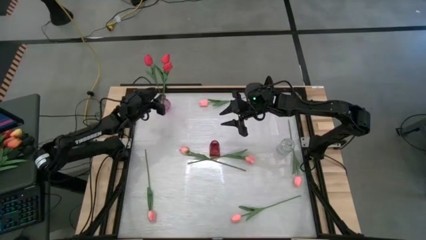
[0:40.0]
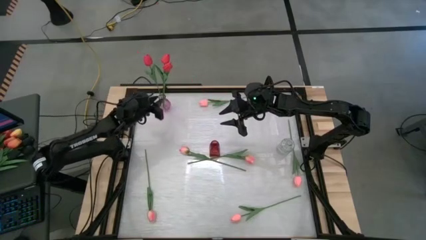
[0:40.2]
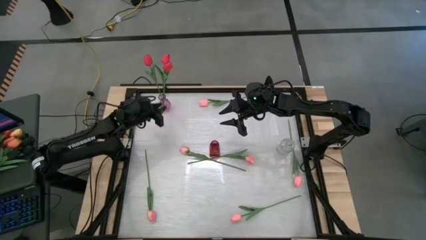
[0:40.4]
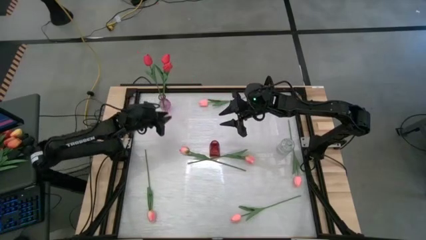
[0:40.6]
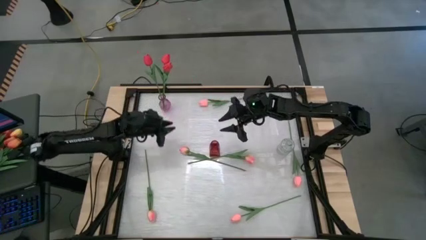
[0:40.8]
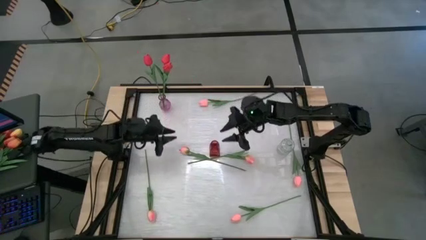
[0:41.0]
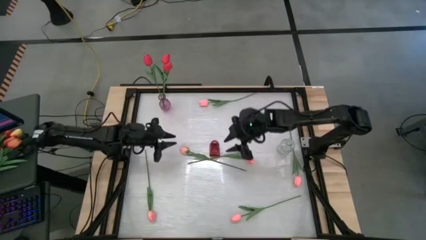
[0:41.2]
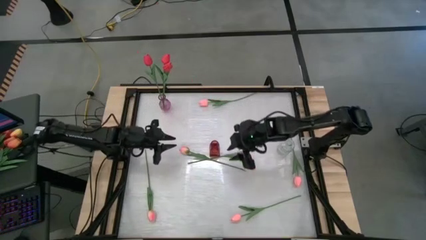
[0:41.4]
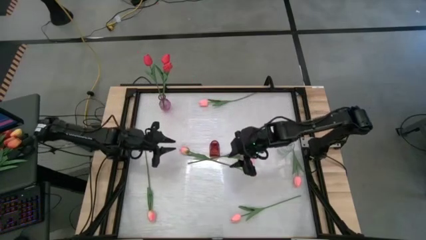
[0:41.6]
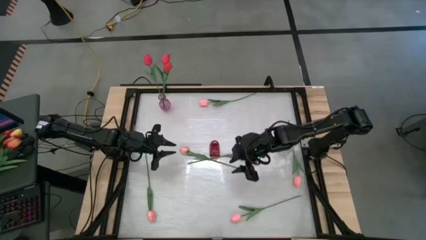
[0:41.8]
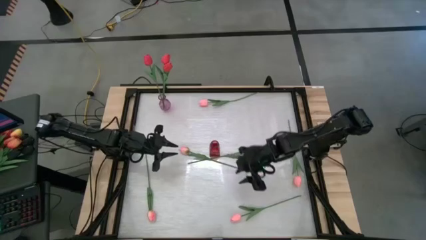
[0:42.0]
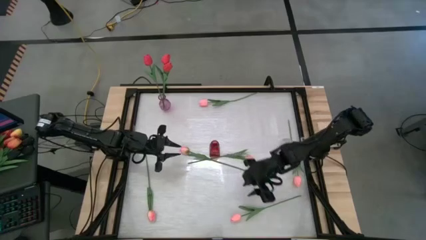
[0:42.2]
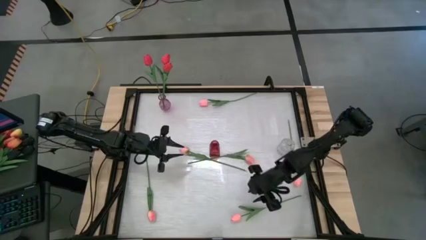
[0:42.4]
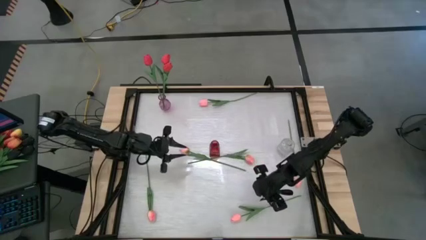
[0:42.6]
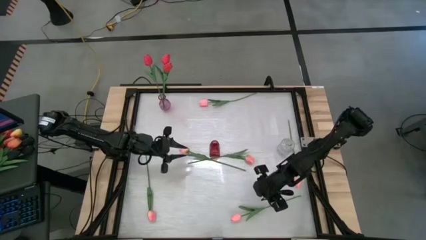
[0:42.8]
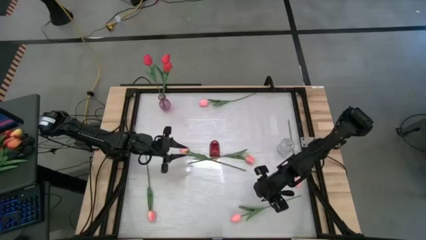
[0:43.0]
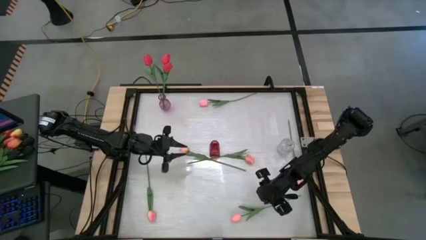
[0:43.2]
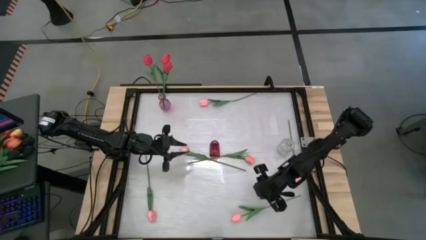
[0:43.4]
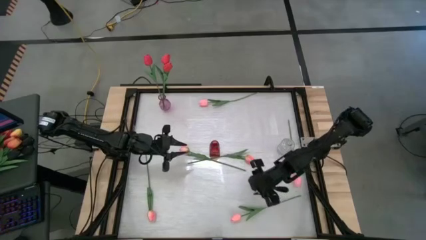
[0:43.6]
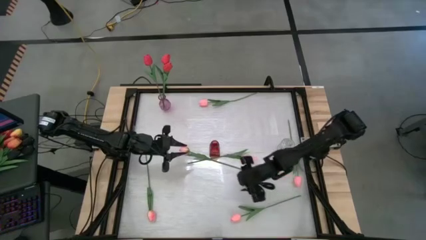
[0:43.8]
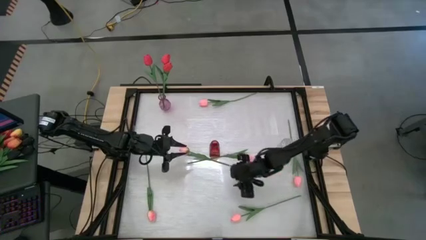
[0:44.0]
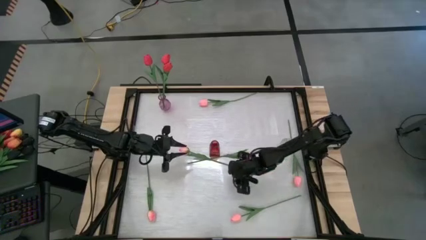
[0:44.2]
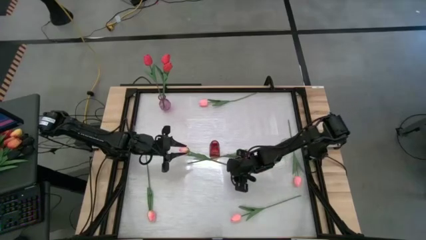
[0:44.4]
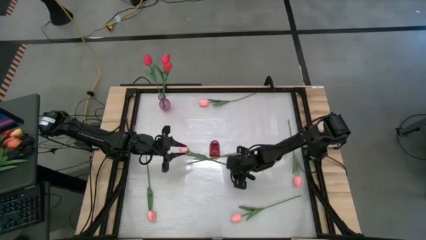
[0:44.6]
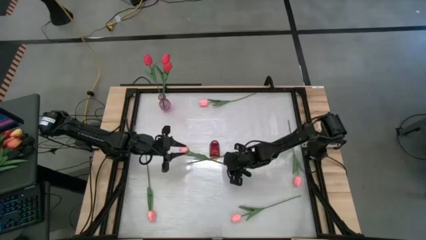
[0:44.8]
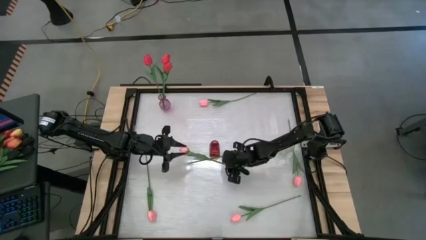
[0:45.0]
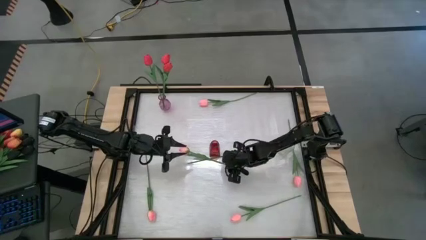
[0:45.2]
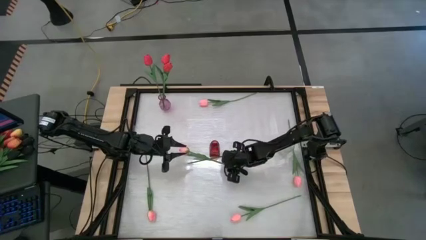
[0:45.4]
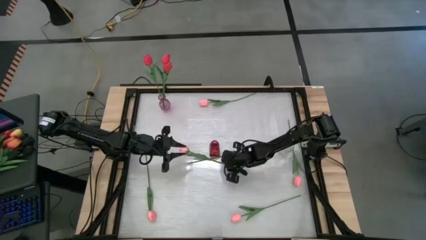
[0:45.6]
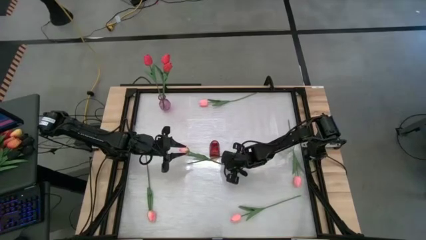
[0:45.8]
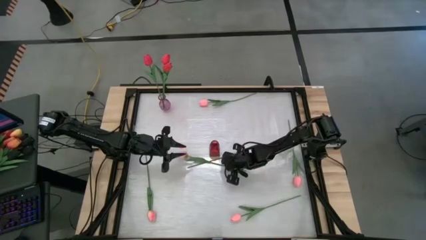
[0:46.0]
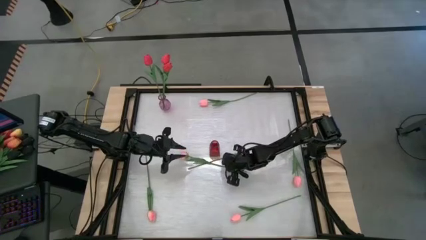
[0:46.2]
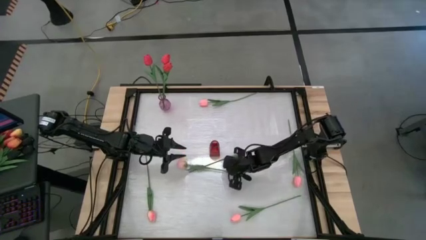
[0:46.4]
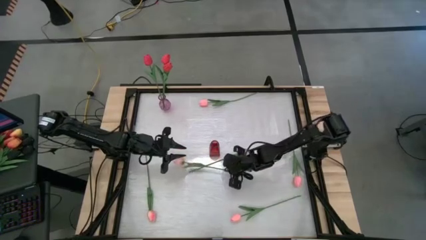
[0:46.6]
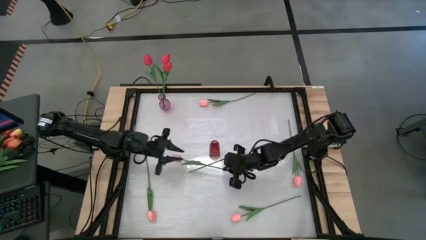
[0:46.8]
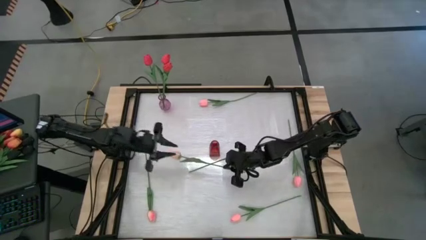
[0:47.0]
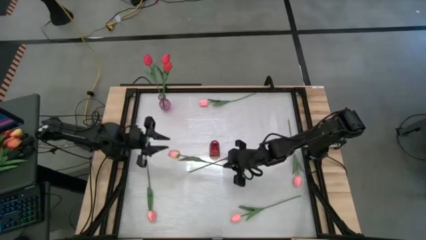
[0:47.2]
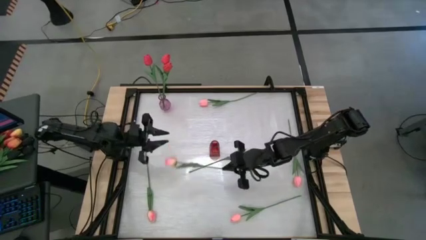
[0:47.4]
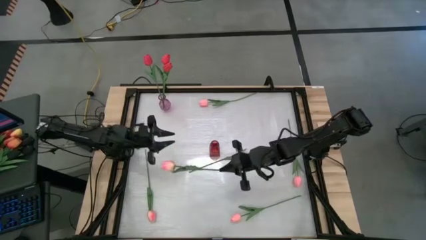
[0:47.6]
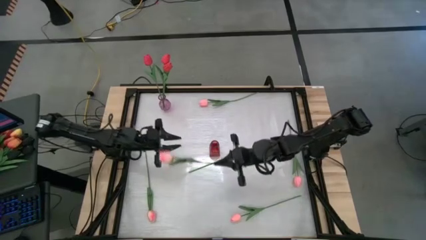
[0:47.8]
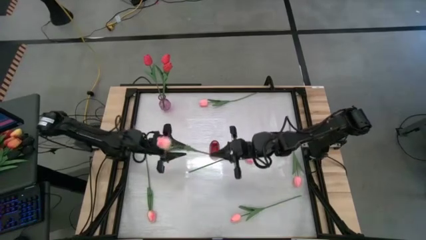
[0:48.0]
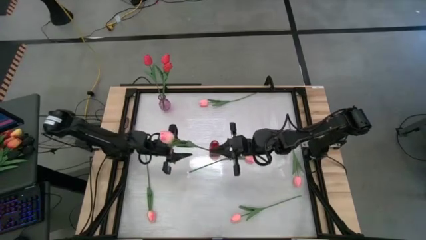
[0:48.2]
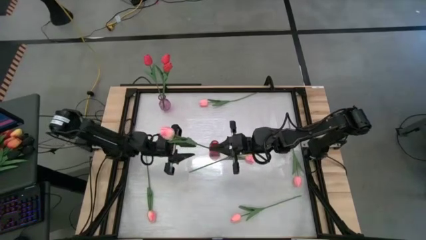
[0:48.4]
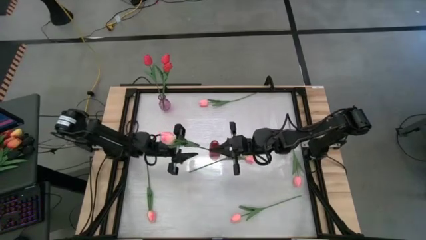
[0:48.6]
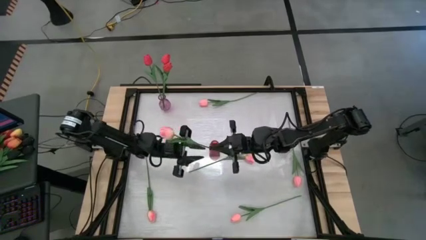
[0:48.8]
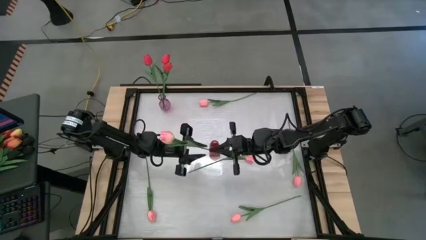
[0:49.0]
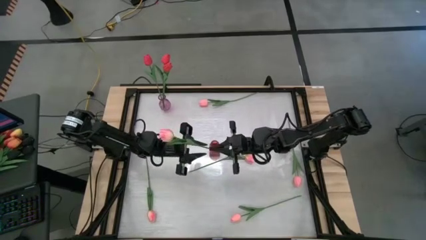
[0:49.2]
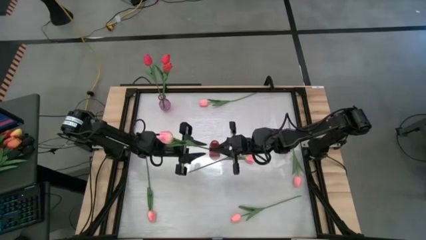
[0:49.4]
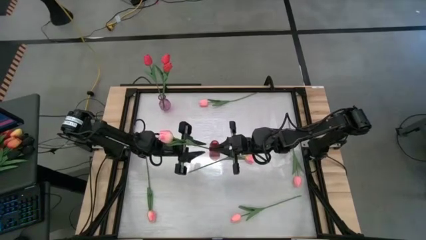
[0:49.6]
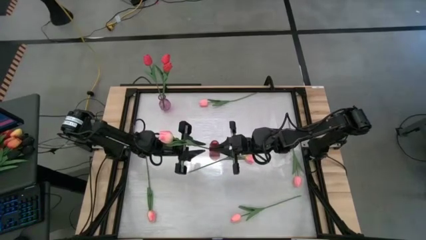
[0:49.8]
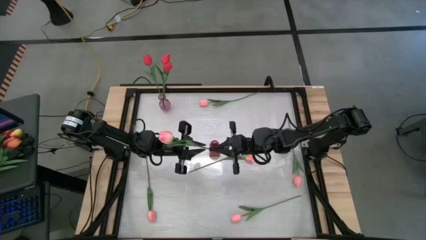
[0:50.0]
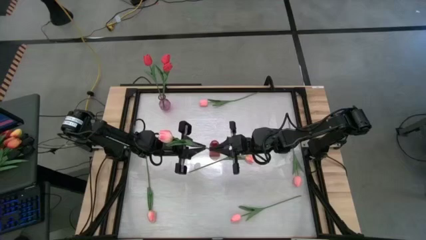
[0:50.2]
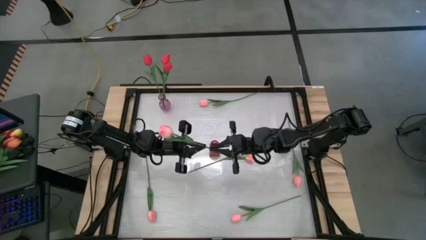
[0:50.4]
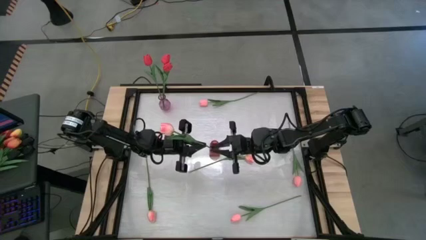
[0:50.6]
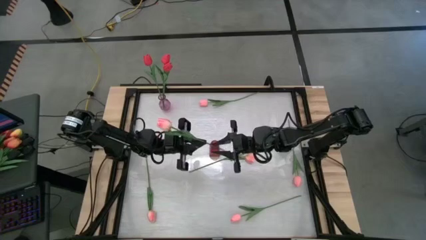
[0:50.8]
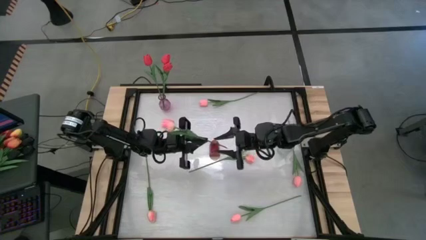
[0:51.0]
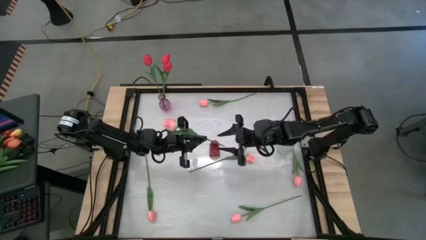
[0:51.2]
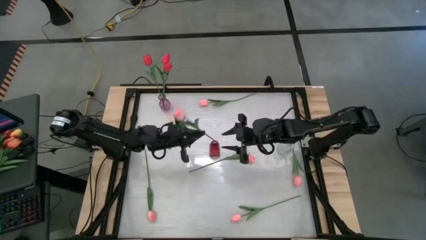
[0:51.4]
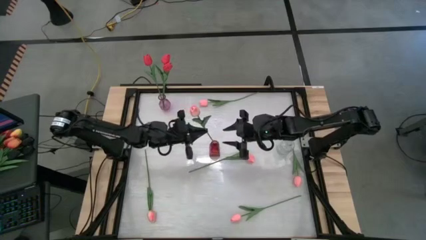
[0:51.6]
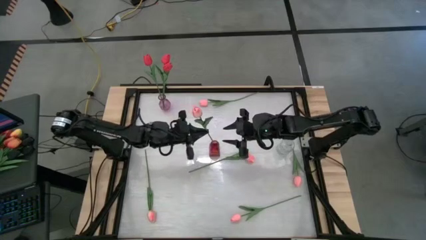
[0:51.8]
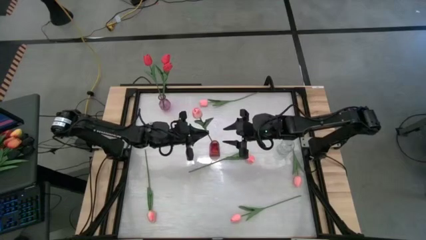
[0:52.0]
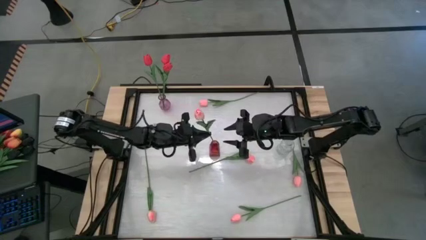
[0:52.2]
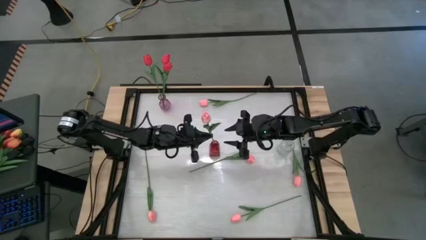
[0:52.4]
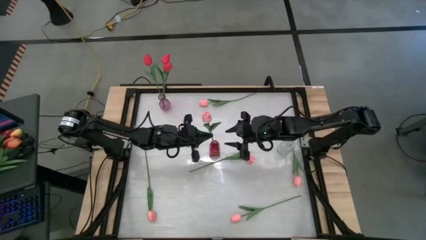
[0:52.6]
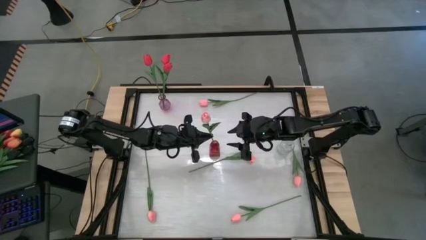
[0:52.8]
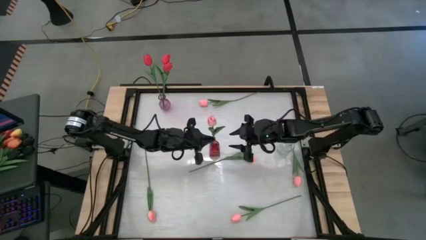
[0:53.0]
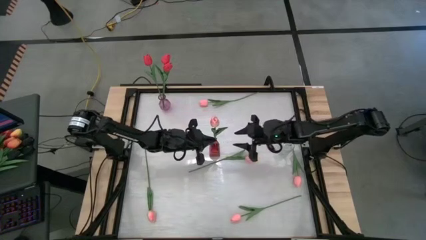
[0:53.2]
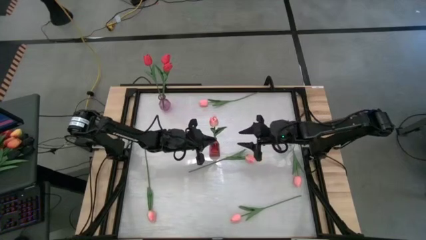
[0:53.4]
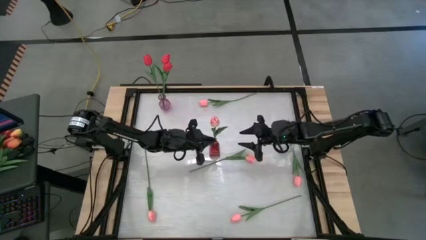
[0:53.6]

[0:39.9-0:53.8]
Task: Sort flowers into vase by color
Put the top left pink-orange tulip into the red vase
